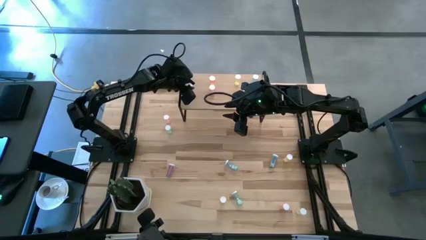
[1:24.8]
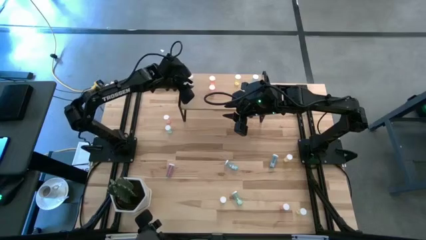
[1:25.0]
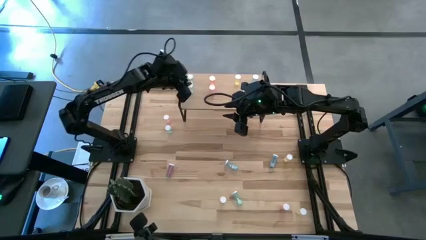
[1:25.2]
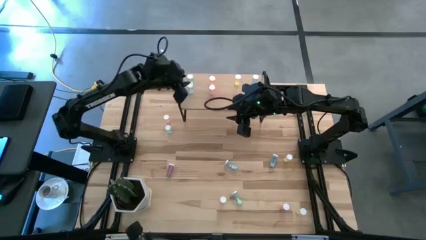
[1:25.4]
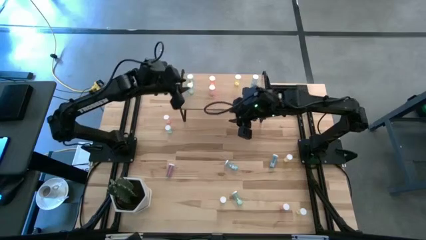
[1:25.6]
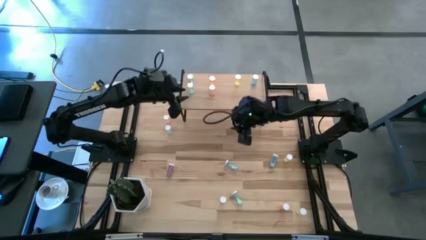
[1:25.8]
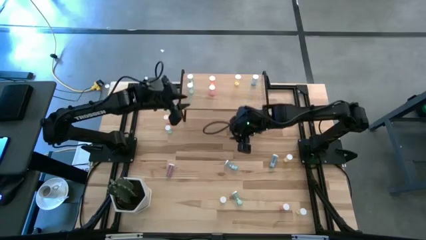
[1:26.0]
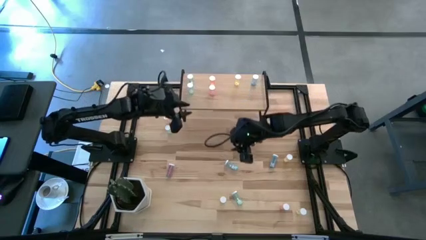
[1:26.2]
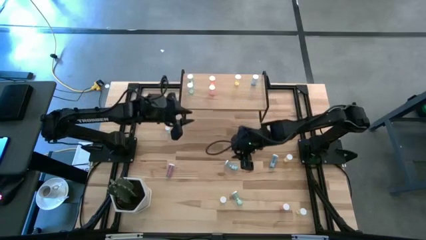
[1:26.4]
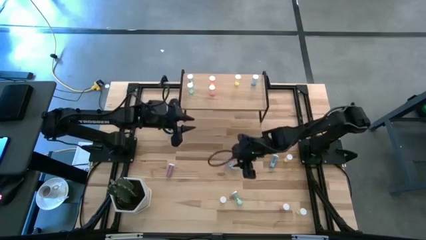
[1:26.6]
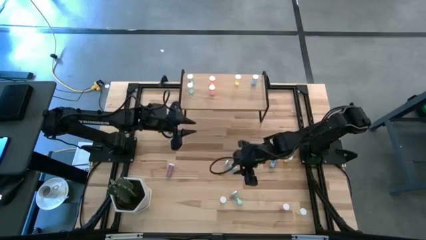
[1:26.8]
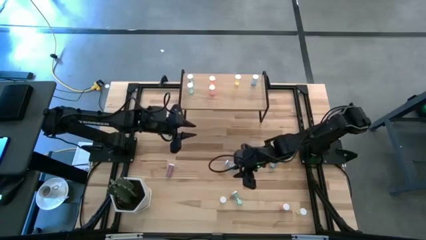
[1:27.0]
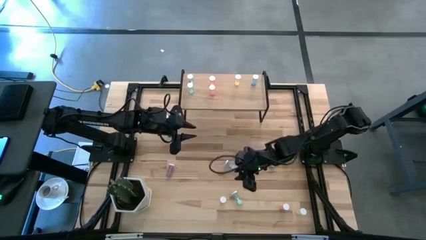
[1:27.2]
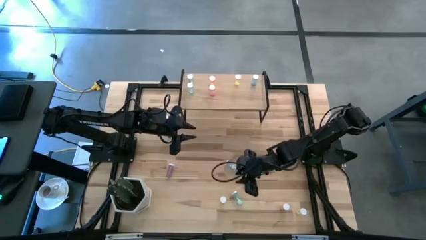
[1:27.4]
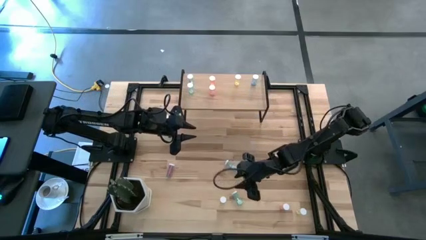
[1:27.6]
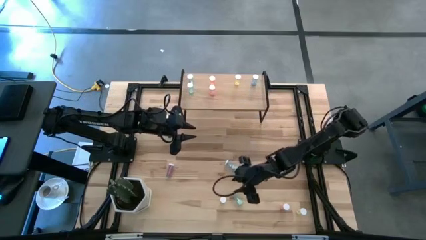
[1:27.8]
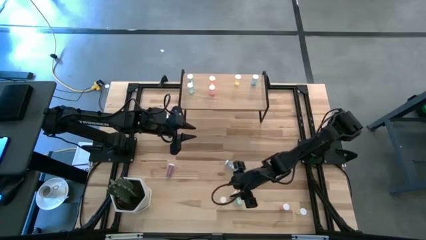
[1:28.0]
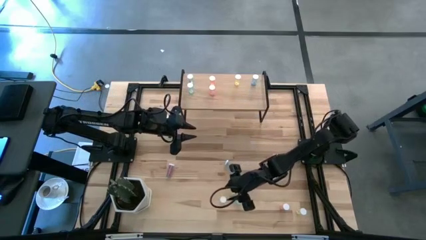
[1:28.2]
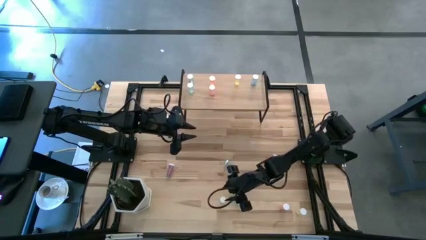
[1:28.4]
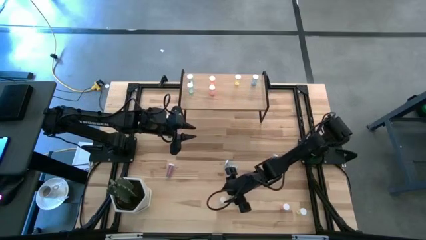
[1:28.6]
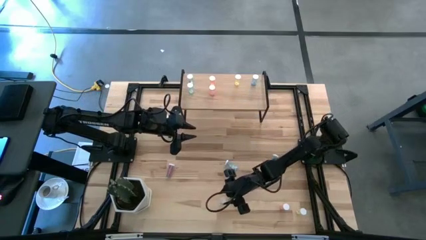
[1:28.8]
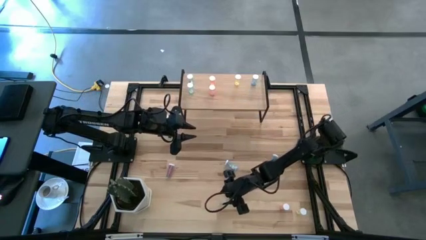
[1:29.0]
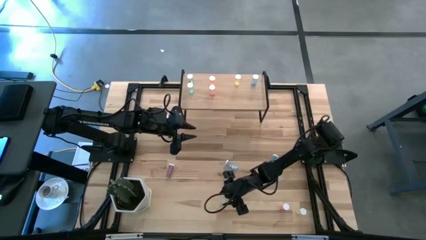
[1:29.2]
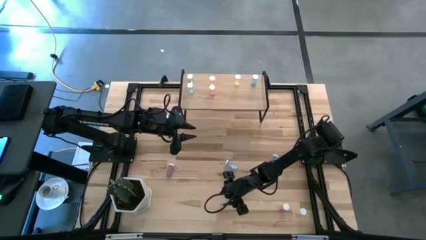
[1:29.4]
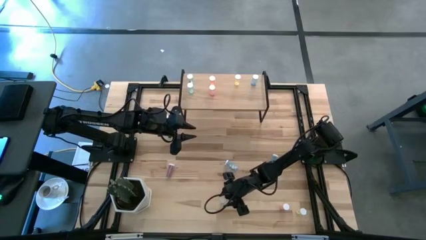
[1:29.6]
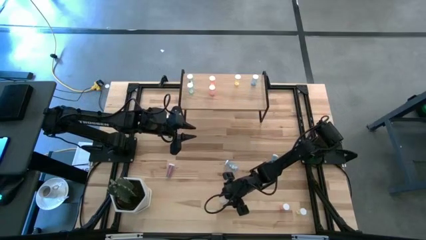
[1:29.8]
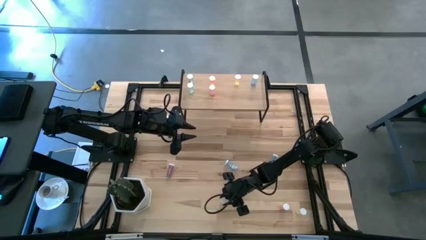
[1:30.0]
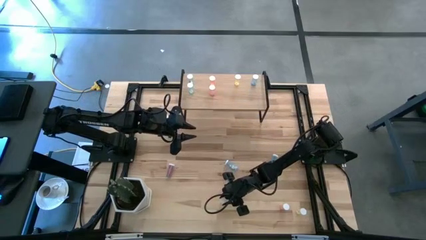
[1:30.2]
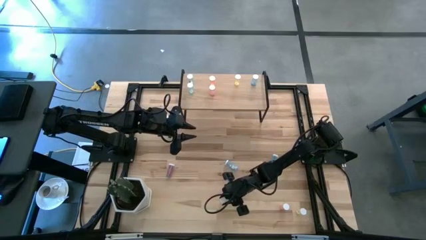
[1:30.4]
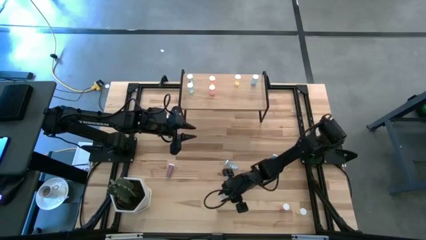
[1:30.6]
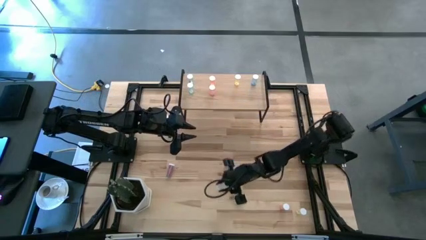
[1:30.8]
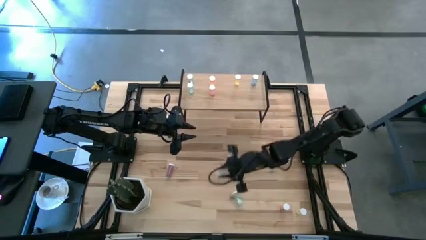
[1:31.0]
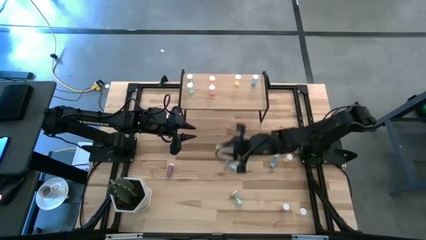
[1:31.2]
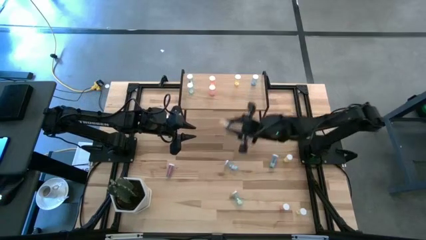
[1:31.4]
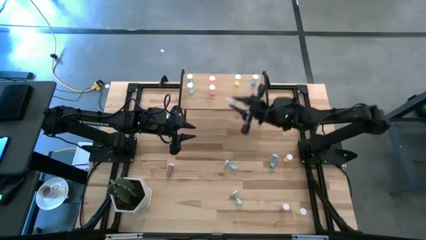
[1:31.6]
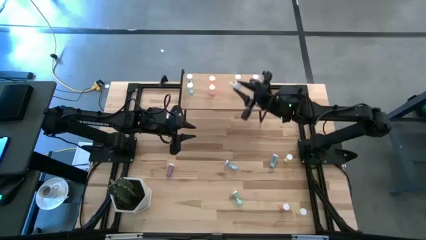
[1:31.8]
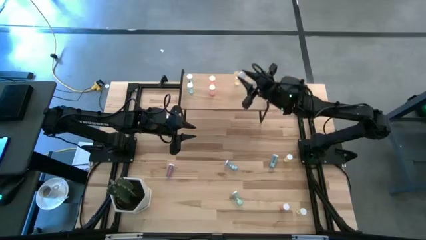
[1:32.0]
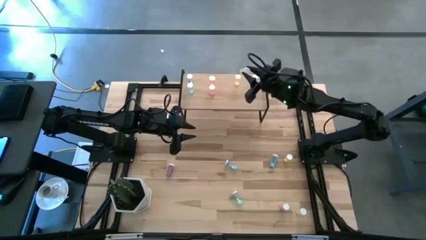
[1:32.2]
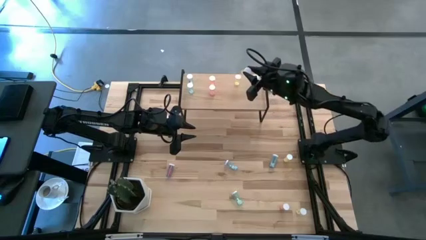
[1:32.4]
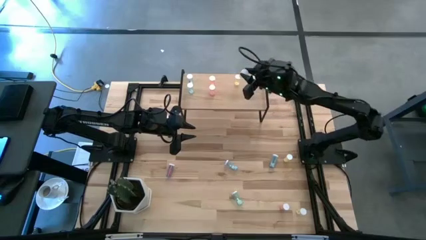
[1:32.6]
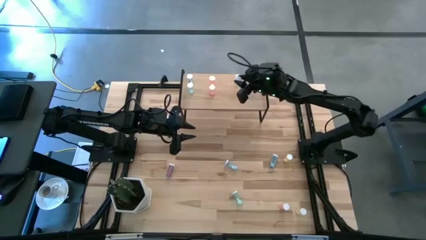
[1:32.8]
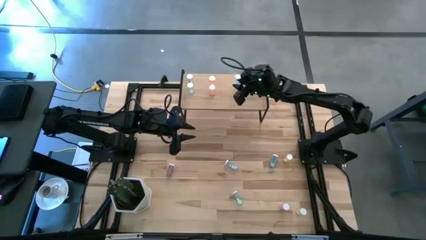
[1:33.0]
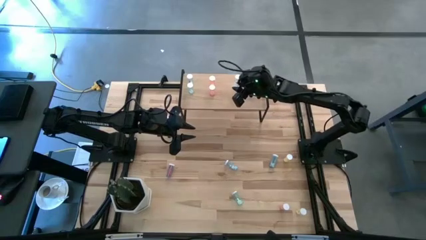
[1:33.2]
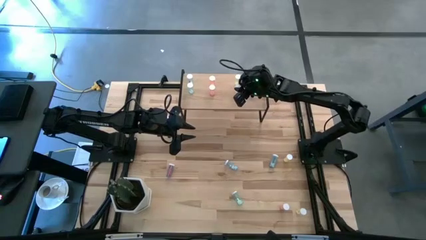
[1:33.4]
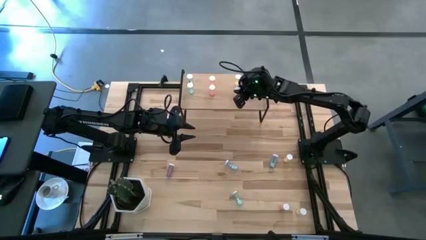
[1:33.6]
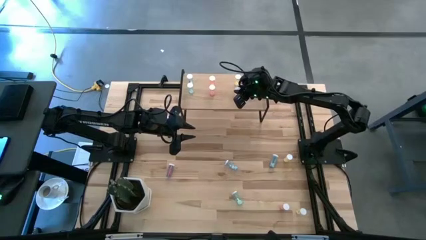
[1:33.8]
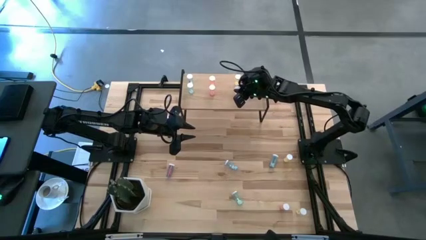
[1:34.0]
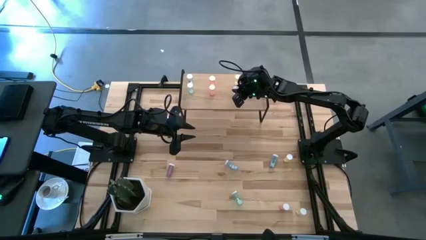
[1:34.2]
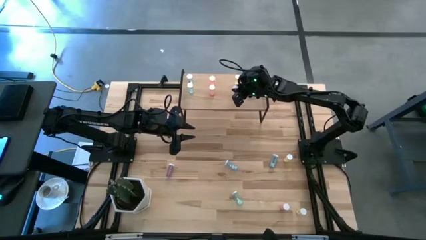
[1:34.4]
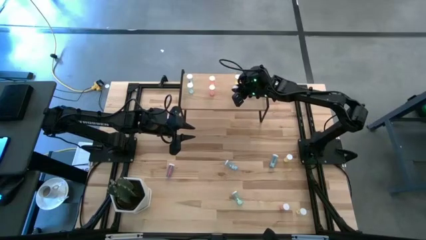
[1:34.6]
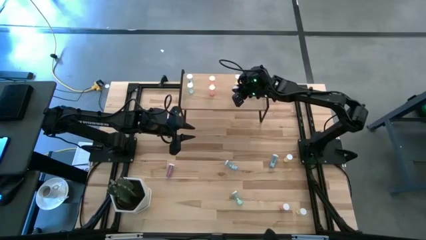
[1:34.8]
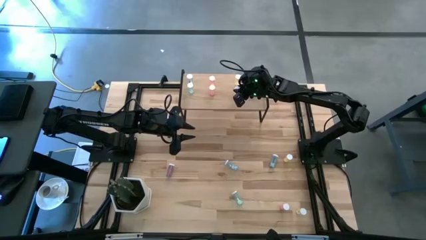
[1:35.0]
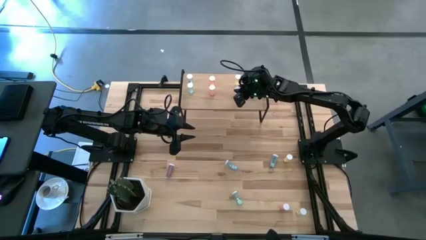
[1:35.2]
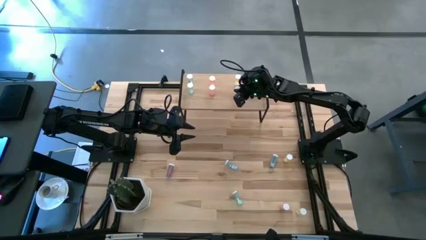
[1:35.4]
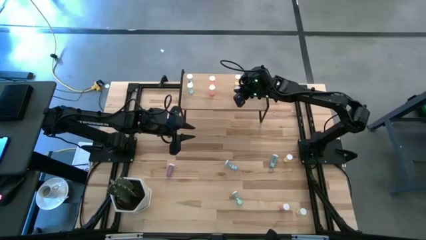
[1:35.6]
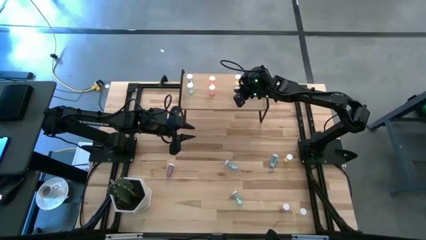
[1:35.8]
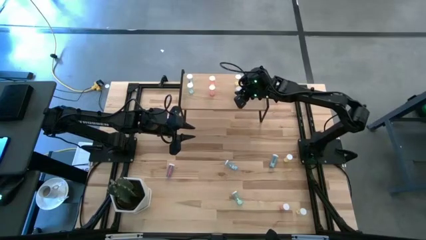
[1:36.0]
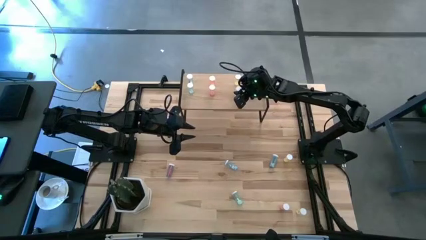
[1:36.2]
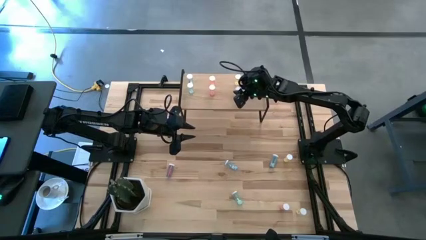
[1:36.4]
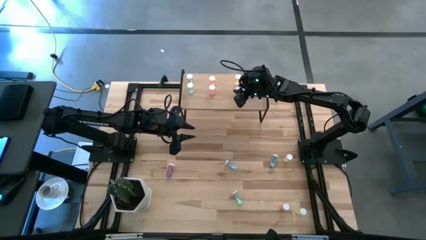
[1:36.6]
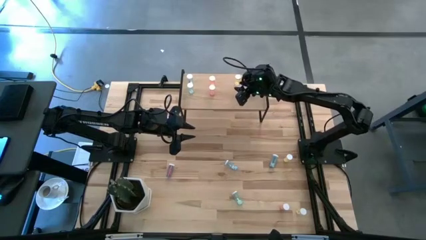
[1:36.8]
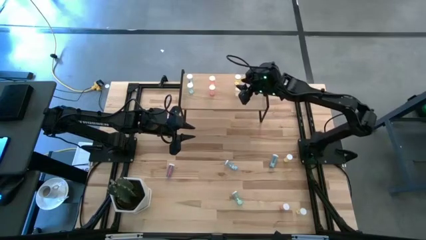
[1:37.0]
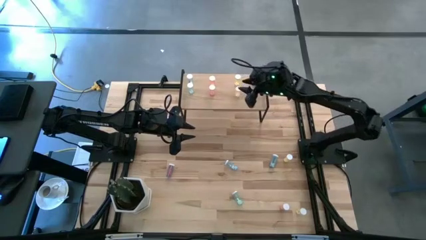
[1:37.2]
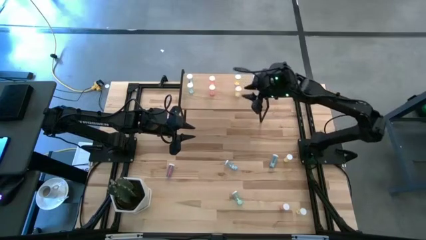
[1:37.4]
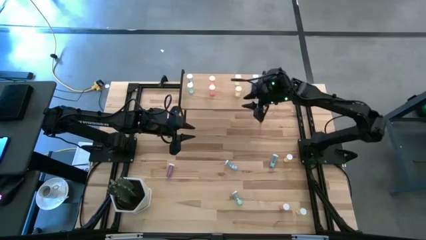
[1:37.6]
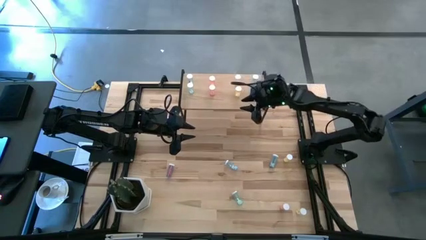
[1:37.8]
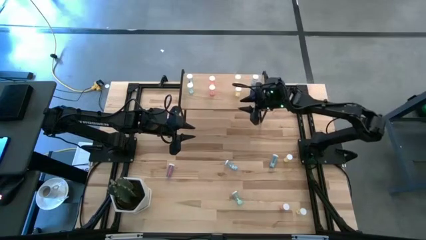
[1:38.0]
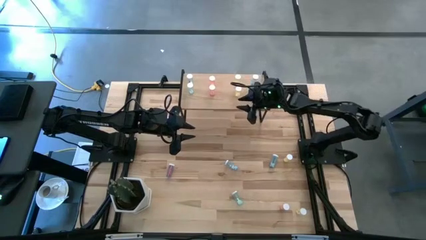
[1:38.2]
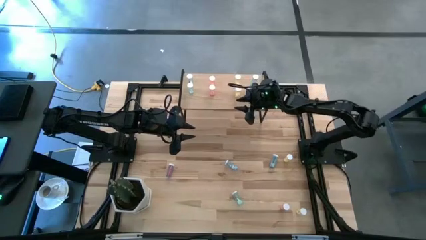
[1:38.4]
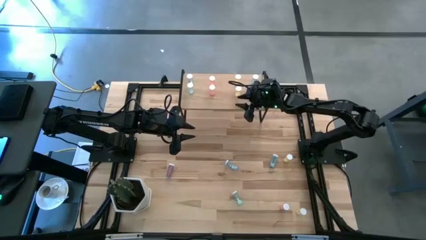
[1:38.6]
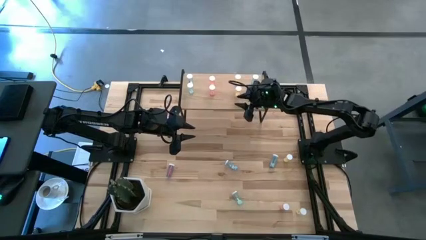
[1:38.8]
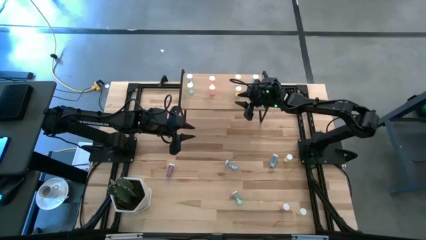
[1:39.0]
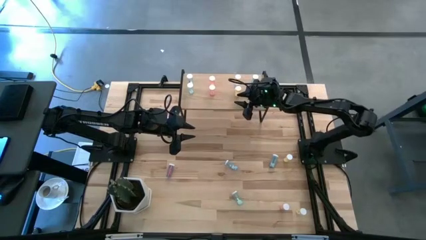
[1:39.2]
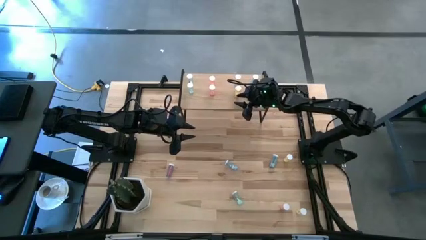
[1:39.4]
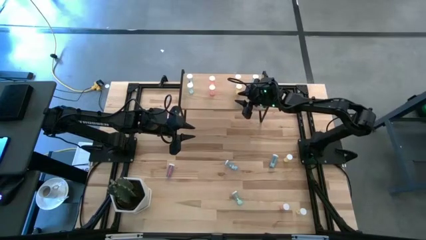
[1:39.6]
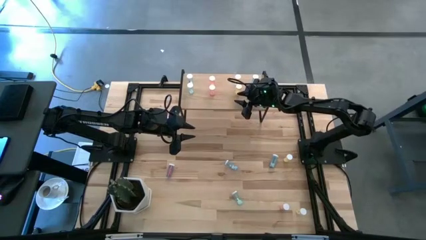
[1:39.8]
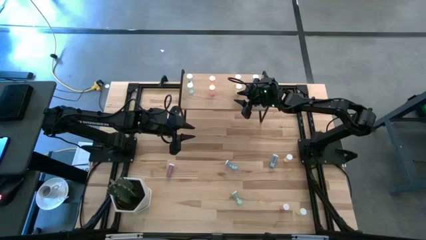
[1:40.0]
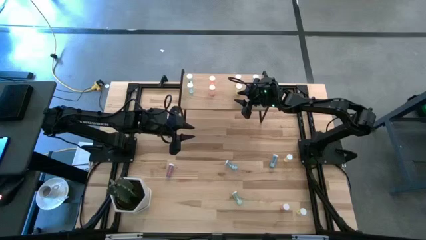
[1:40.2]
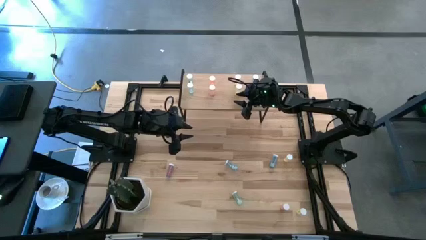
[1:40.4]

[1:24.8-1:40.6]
Task: Pick and place medicine bottles onto shelf by color
Align the yellow pill bottle with the yellow bottle on the shelf
